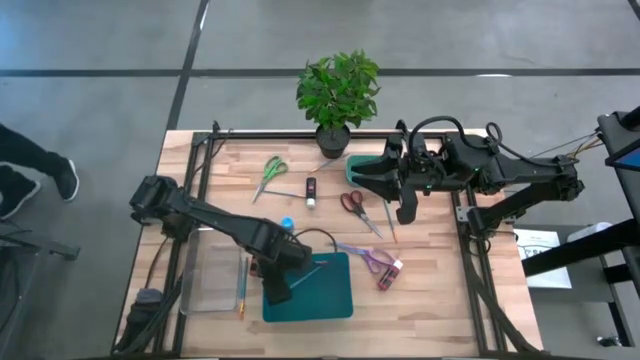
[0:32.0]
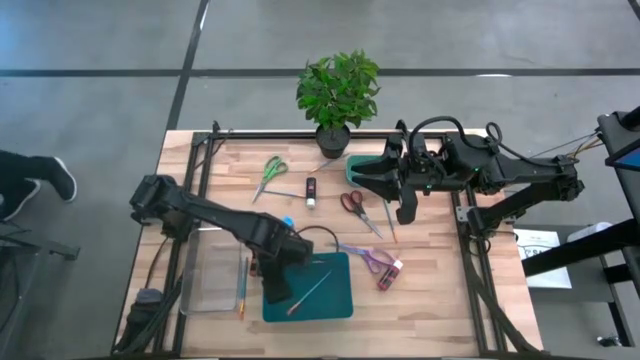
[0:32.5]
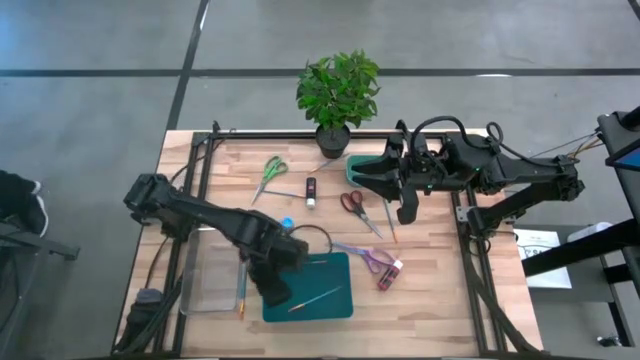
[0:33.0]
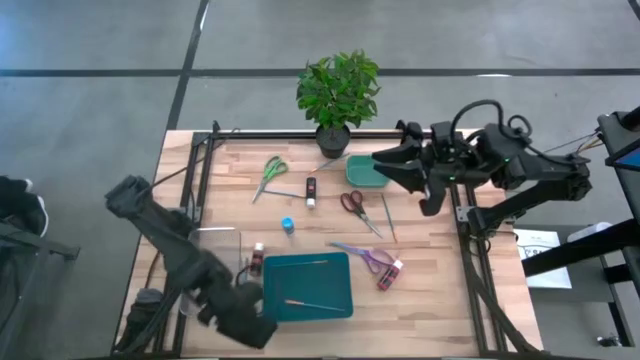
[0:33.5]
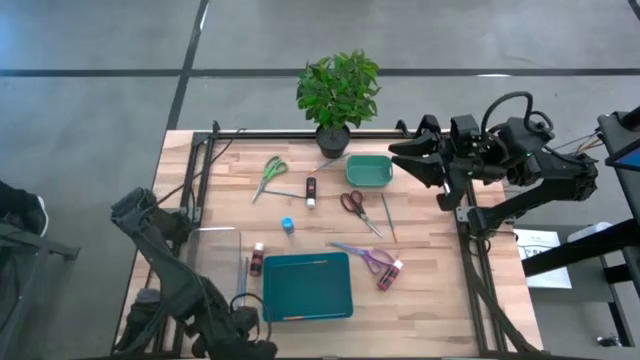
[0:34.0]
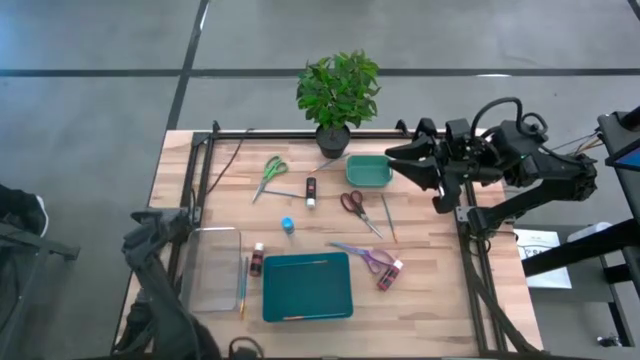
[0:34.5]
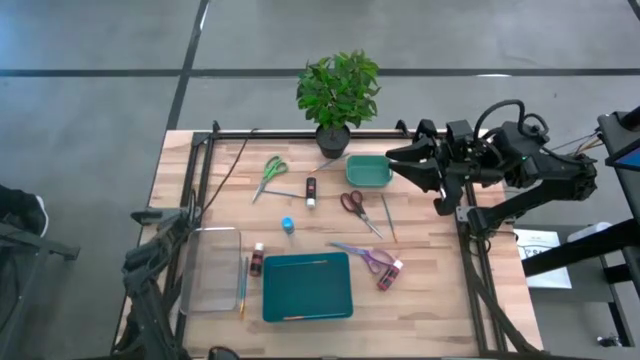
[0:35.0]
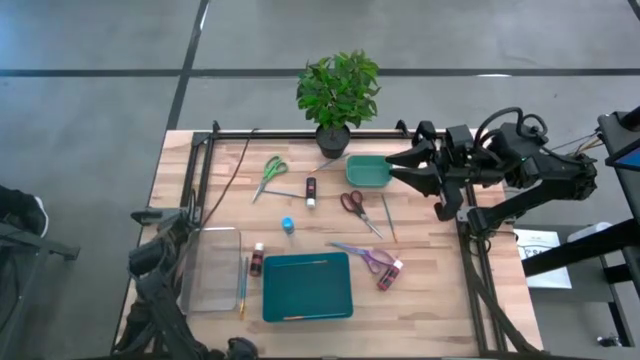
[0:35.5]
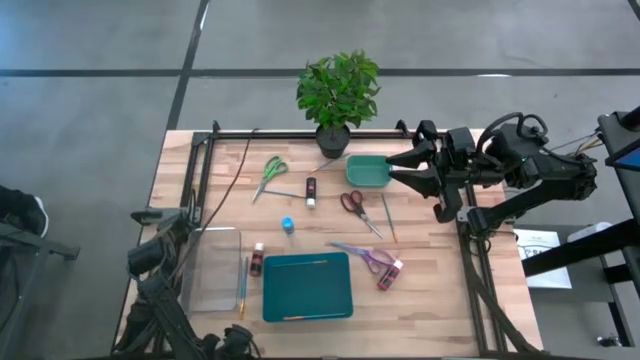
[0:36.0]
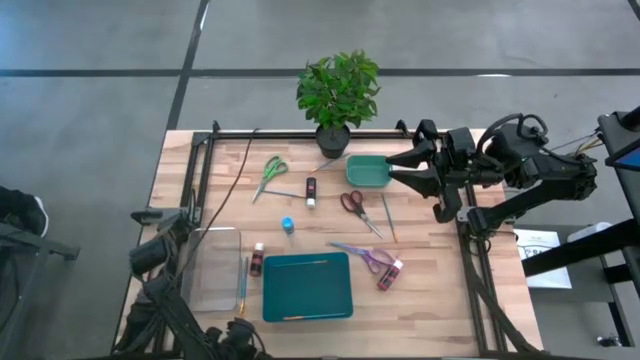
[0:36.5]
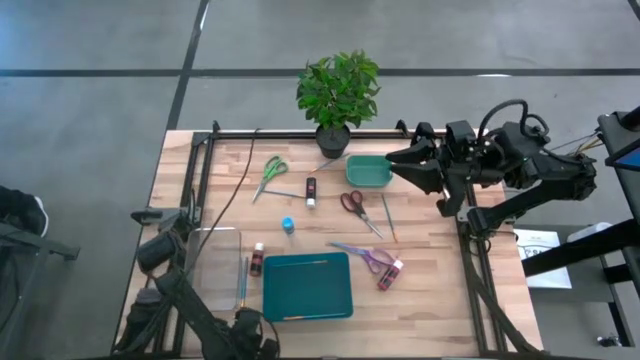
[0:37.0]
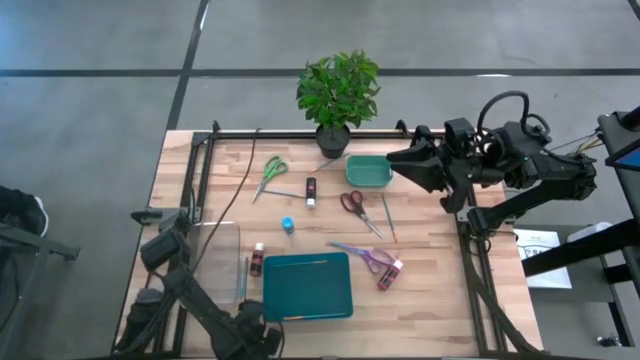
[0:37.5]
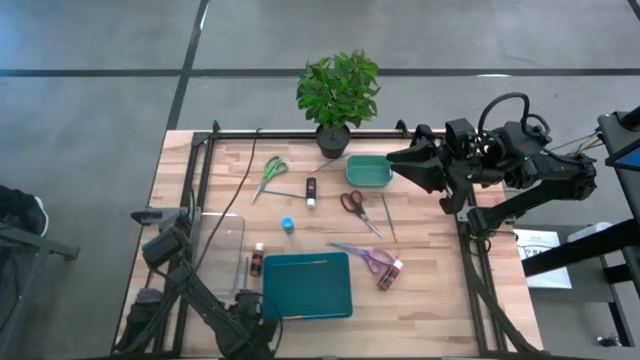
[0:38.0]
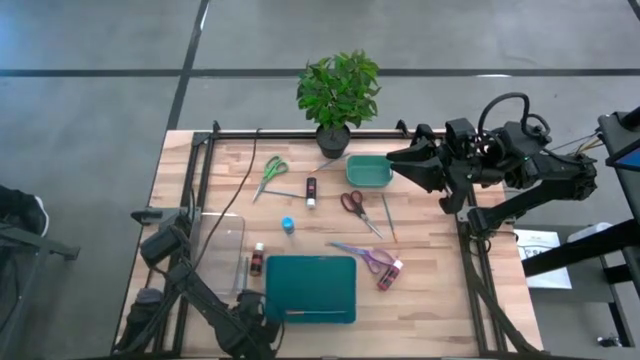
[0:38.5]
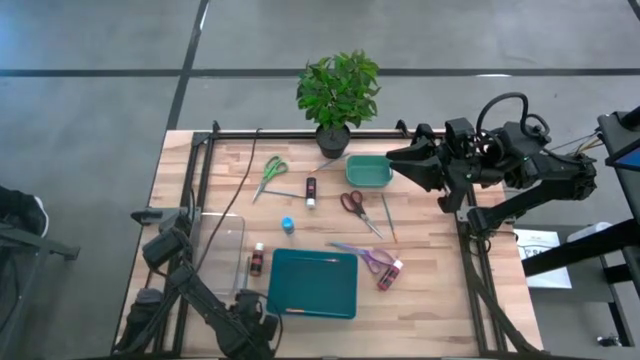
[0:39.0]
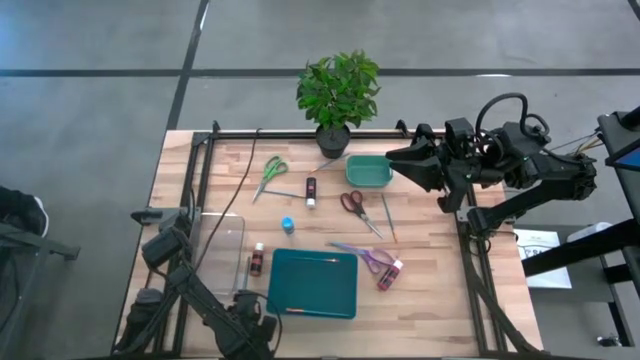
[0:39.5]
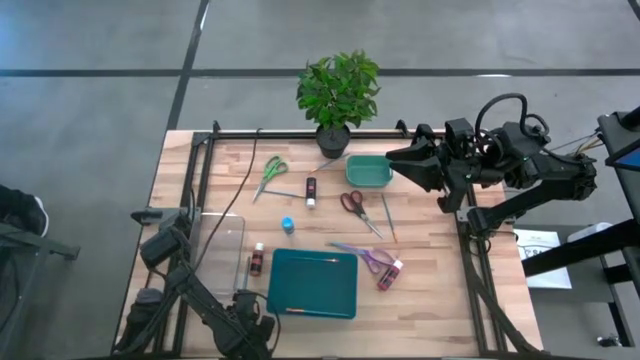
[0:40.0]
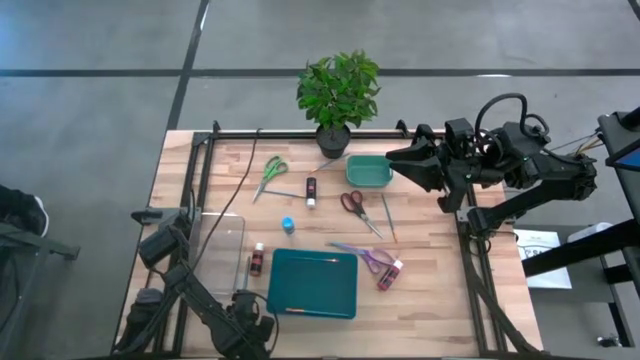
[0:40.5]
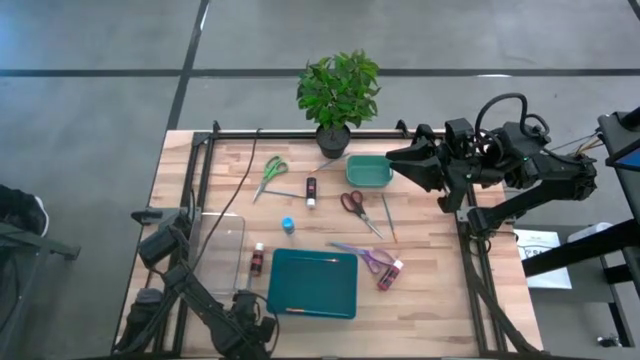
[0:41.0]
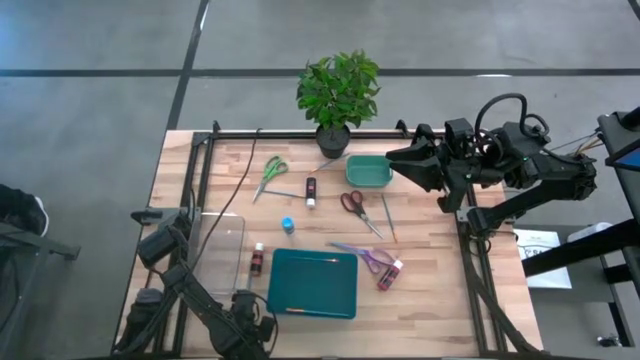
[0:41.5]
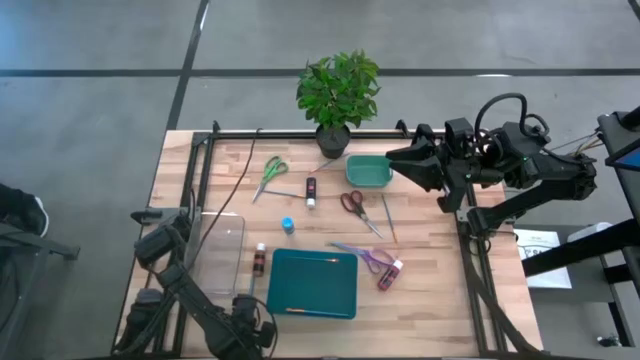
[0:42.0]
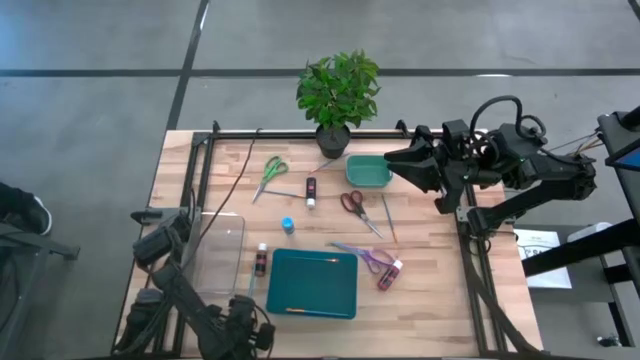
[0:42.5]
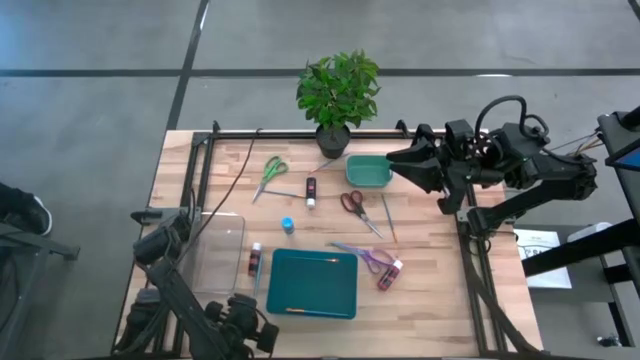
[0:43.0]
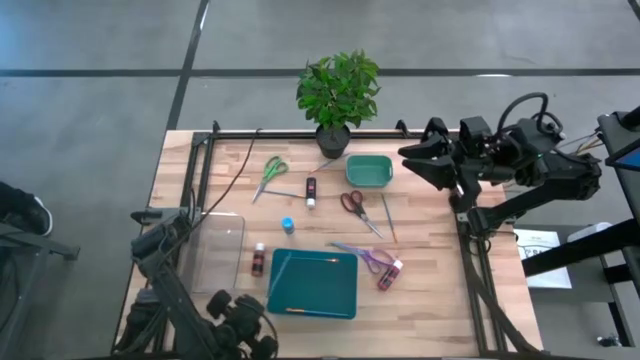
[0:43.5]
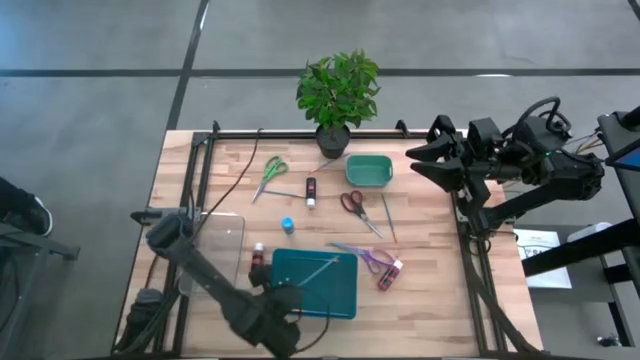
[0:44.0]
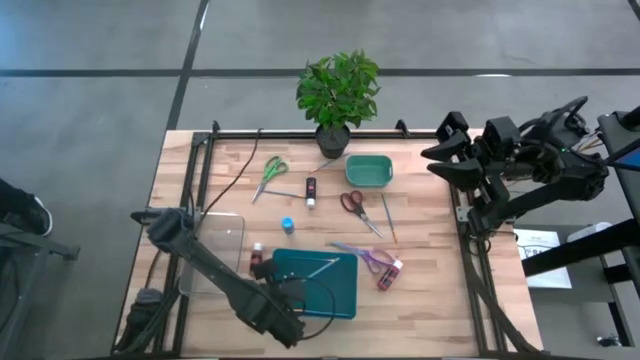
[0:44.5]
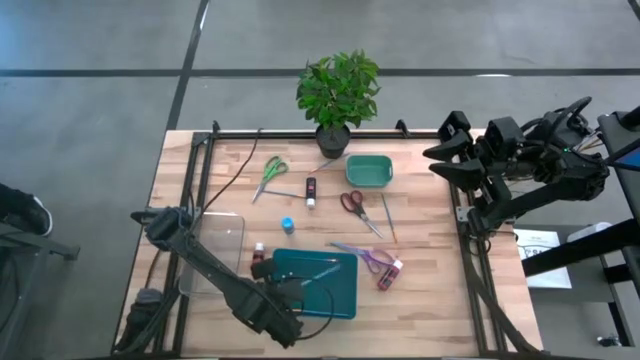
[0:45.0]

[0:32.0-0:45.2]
Task: Pick & Place Paint Supplies
Put the blue paint brush into the blue bin

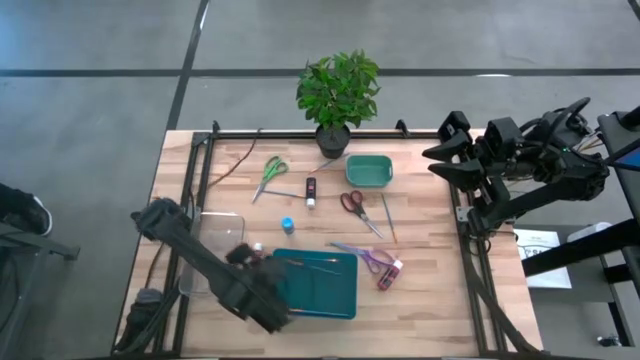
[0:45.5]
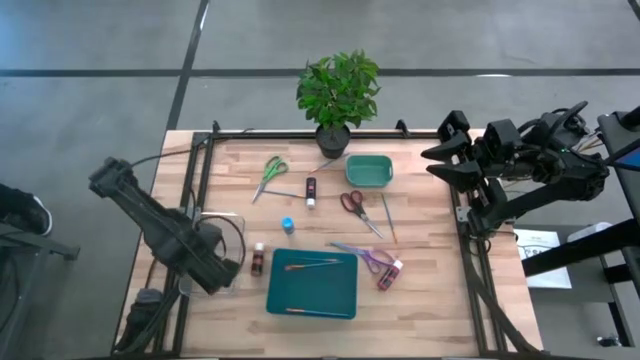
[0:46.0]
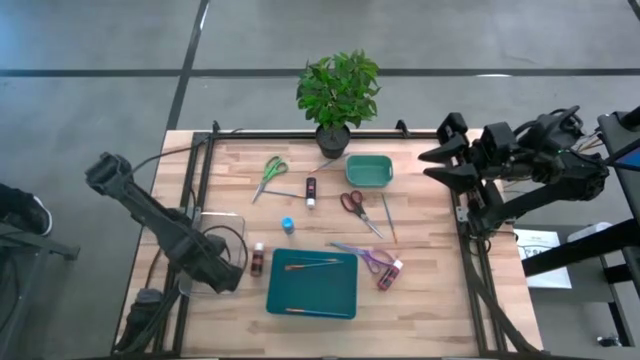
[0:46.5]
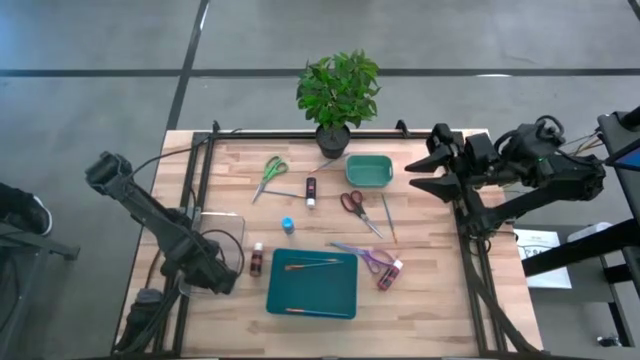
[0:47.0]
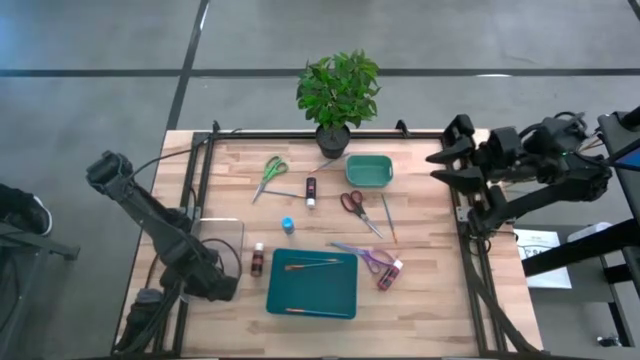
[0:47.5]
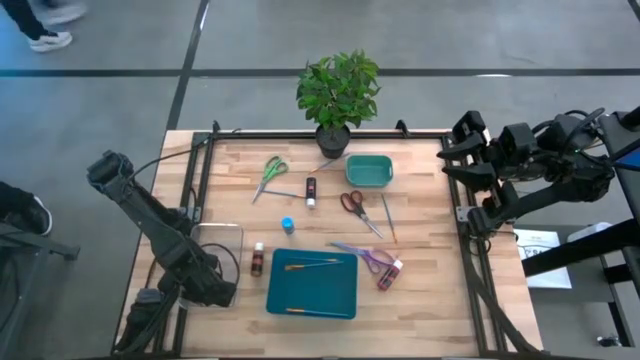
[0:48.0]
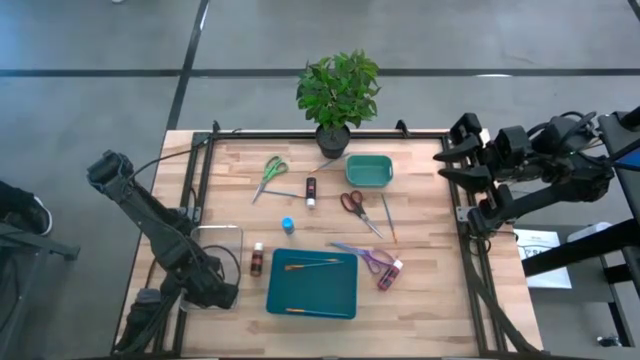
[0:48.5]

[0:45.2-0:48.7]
Adjust the transparent bin

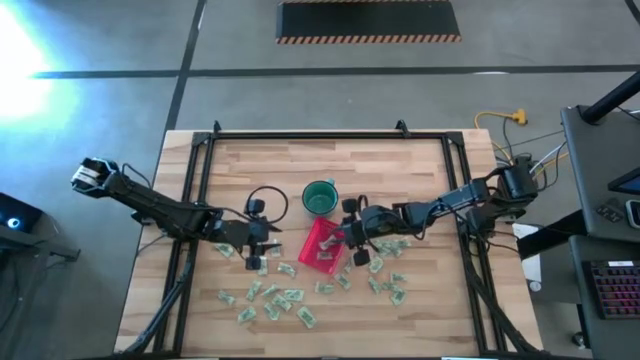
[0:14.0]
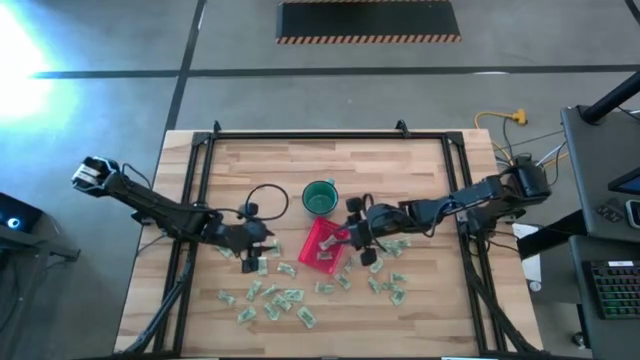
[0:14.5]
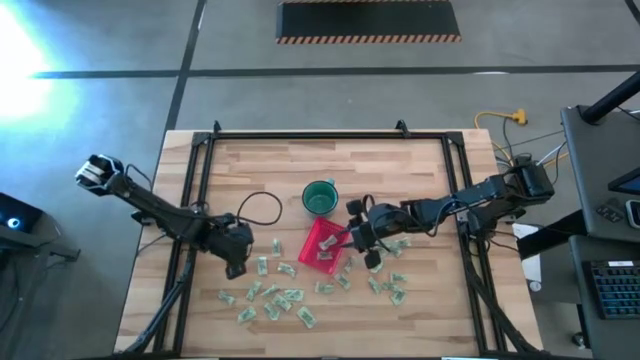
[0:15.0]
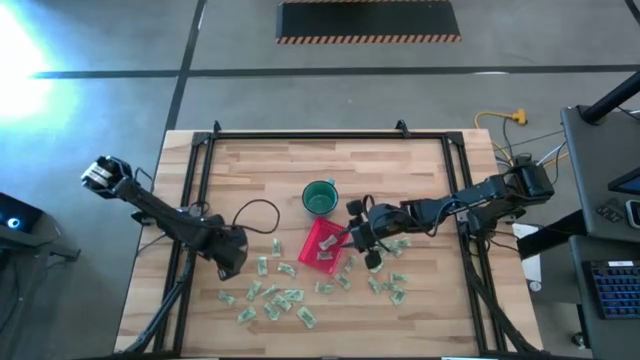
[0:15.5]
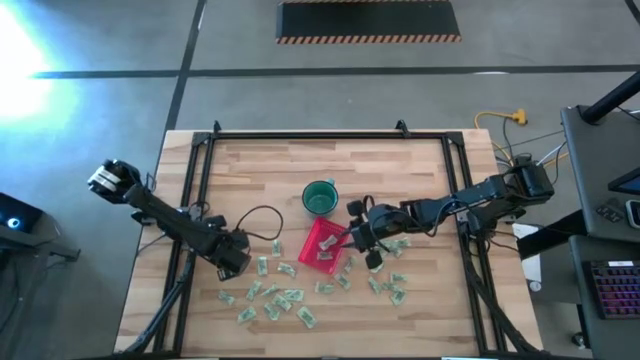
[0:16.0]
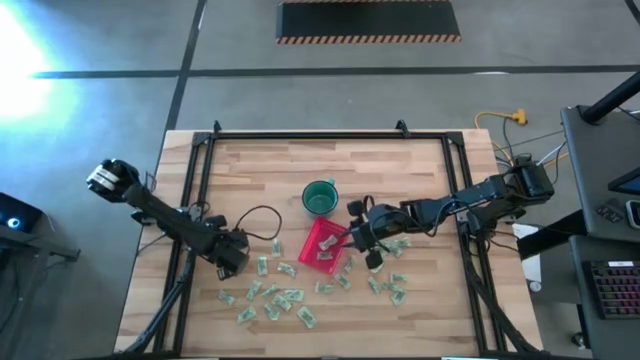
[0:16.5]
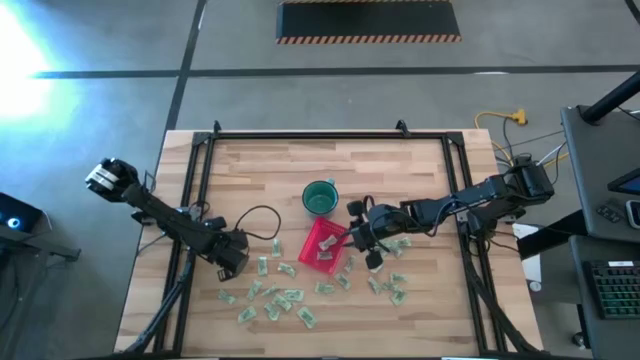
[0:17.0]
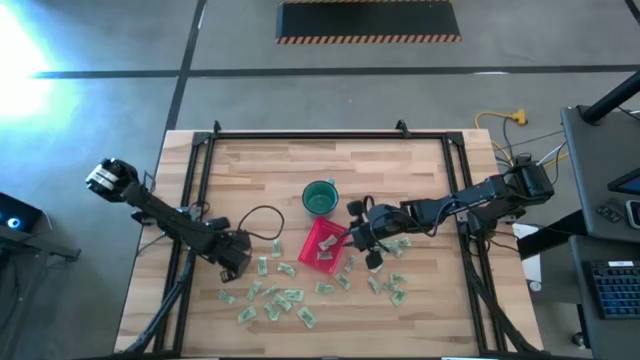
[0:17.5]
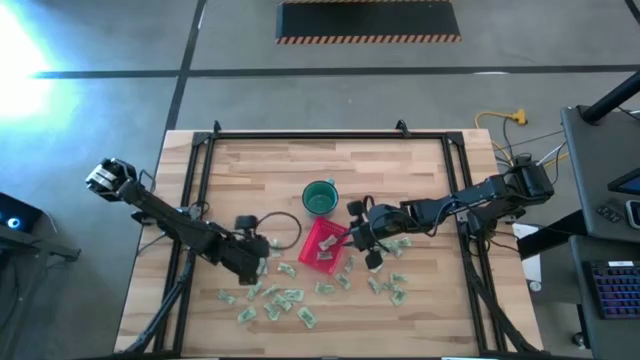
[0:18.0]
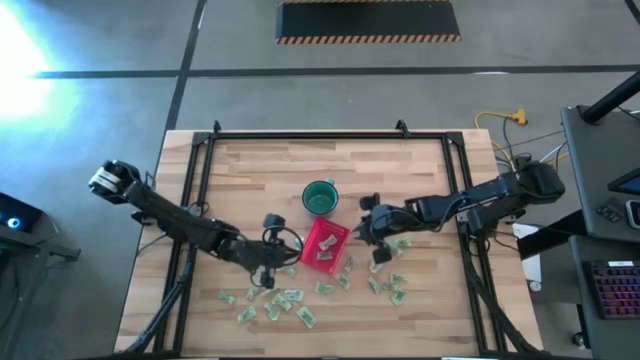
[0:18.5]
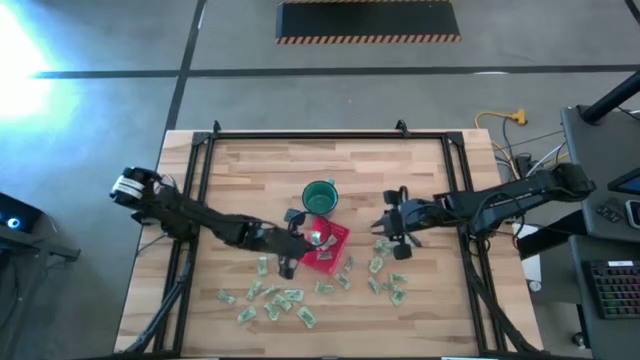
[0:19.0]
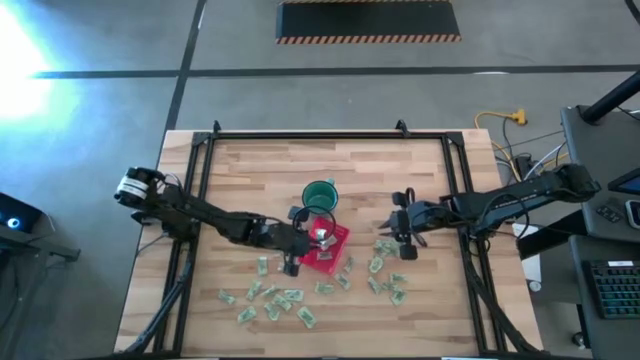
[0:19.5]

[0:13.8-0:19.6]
Task: Pick and place items into bin
Put the light green stevia packet into the red bin
